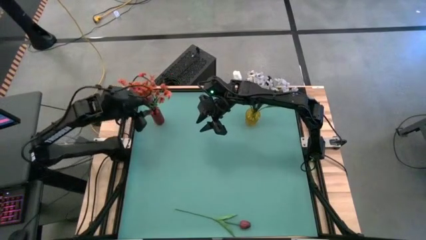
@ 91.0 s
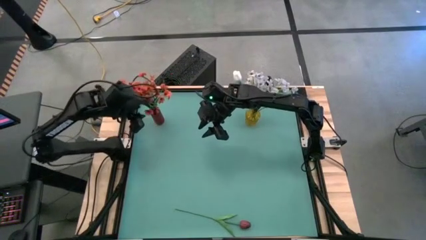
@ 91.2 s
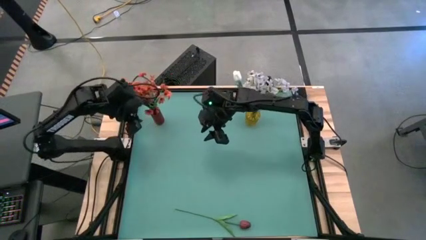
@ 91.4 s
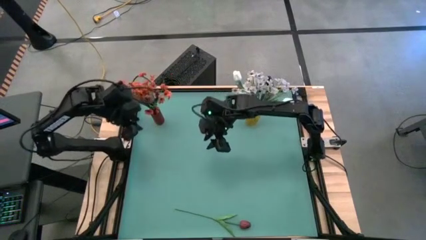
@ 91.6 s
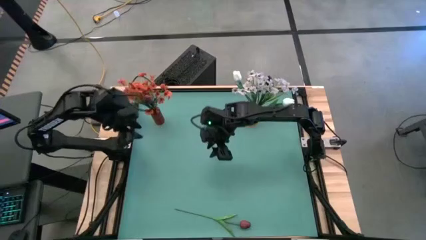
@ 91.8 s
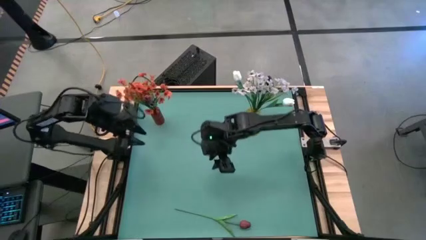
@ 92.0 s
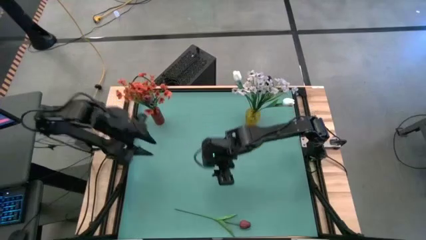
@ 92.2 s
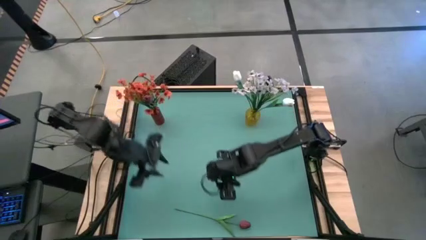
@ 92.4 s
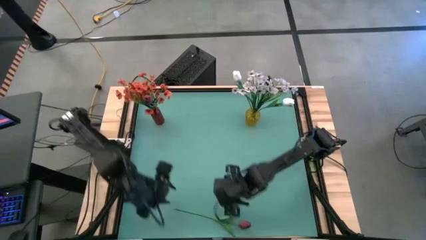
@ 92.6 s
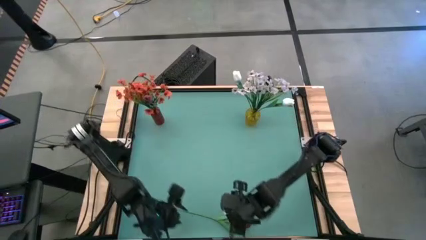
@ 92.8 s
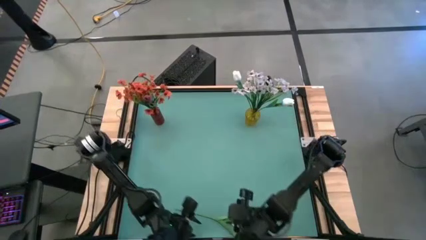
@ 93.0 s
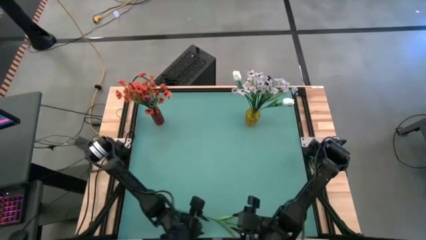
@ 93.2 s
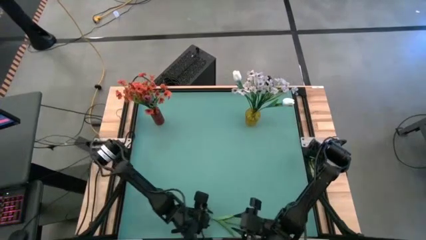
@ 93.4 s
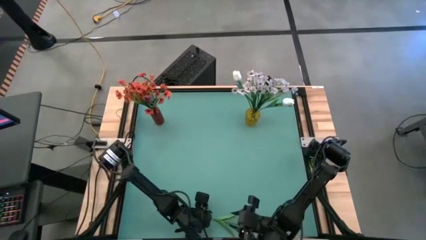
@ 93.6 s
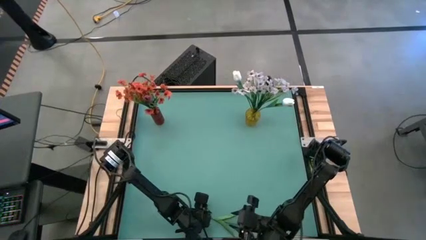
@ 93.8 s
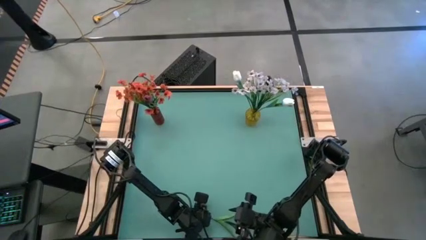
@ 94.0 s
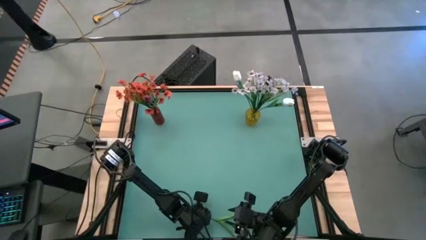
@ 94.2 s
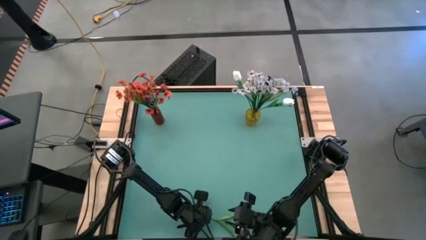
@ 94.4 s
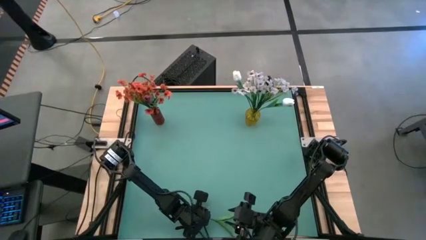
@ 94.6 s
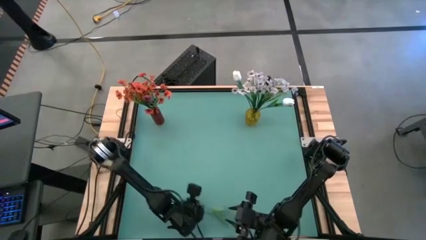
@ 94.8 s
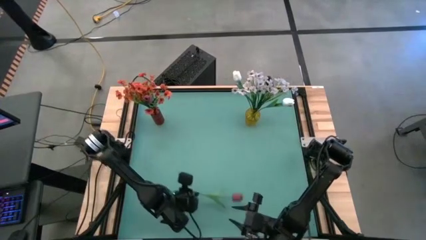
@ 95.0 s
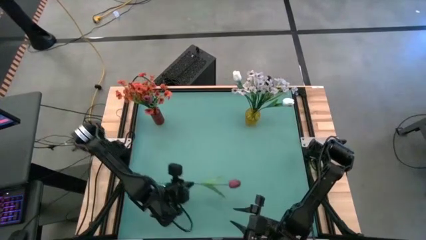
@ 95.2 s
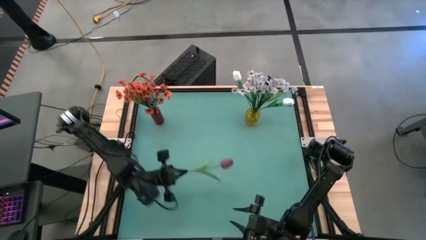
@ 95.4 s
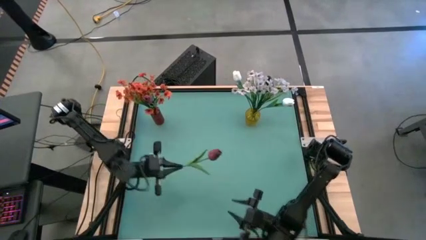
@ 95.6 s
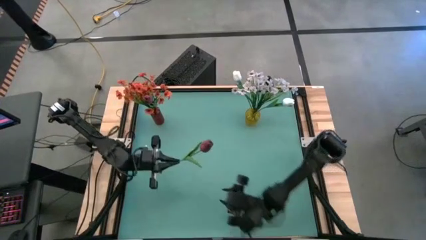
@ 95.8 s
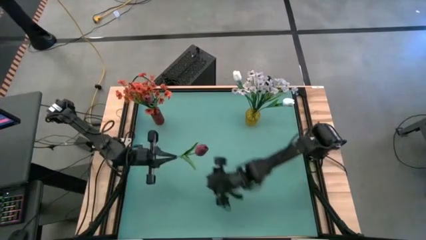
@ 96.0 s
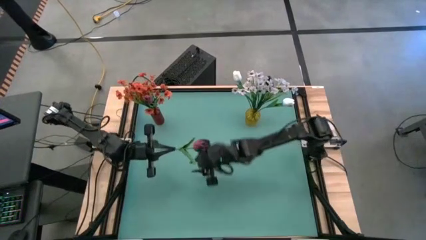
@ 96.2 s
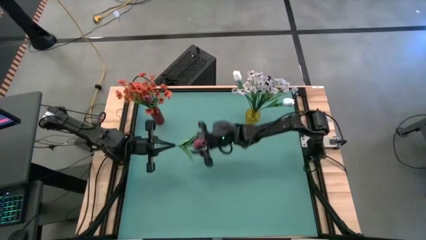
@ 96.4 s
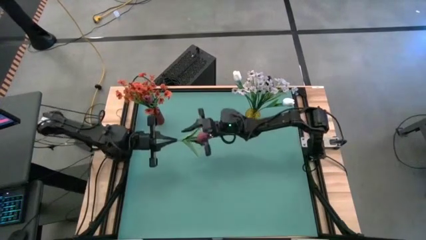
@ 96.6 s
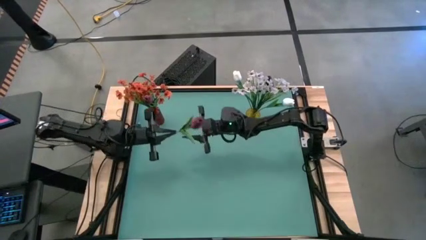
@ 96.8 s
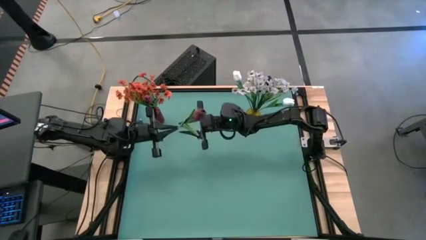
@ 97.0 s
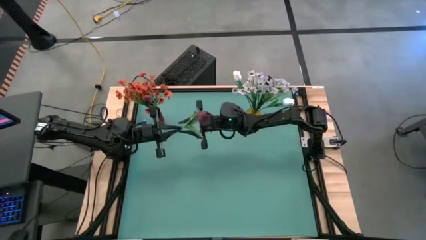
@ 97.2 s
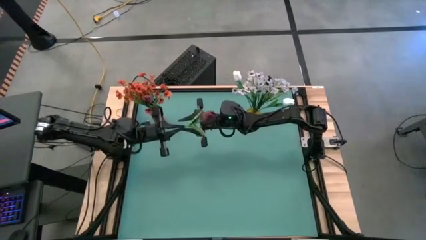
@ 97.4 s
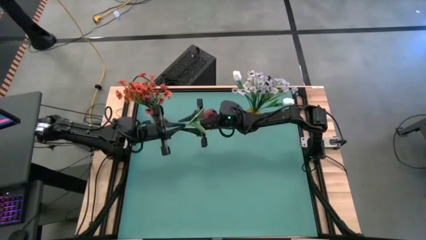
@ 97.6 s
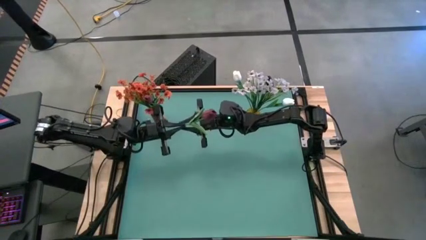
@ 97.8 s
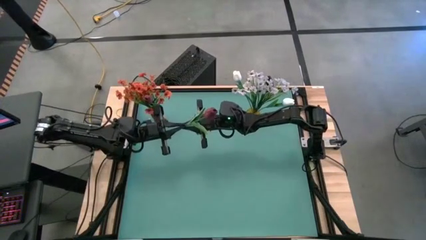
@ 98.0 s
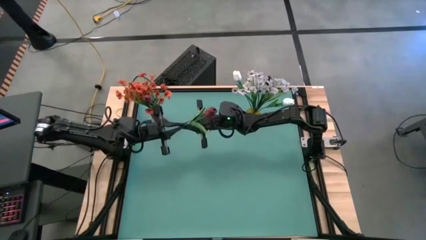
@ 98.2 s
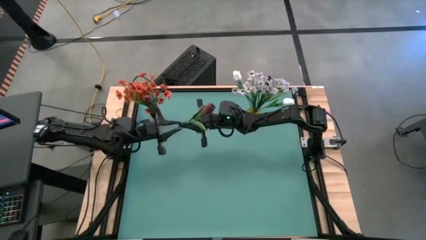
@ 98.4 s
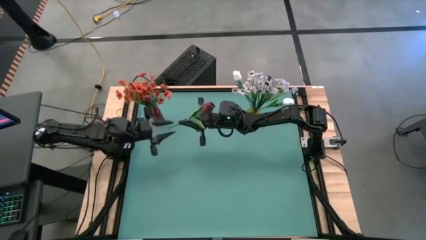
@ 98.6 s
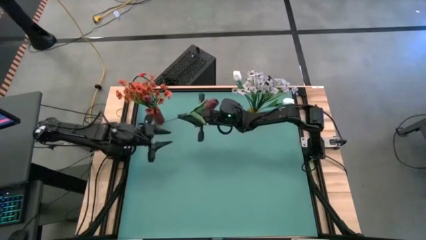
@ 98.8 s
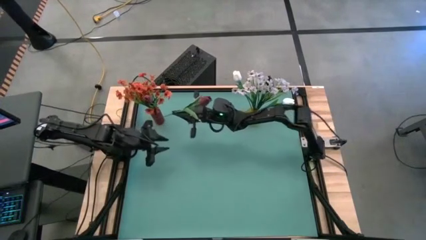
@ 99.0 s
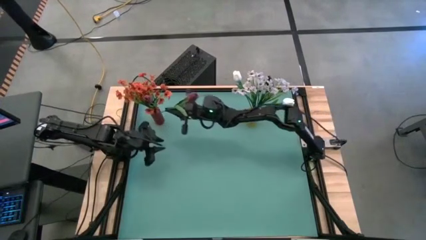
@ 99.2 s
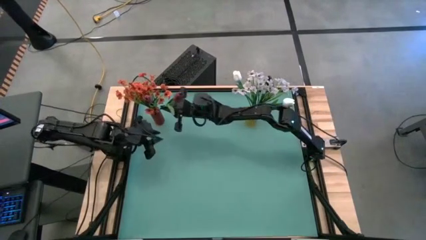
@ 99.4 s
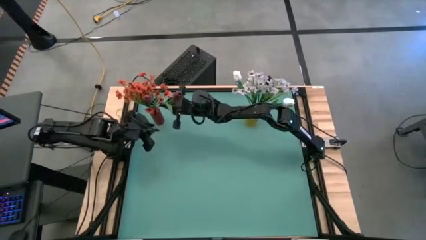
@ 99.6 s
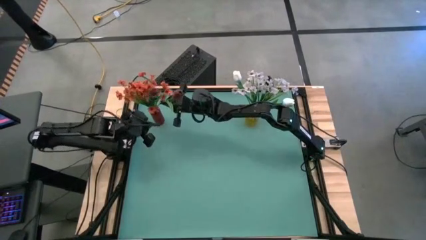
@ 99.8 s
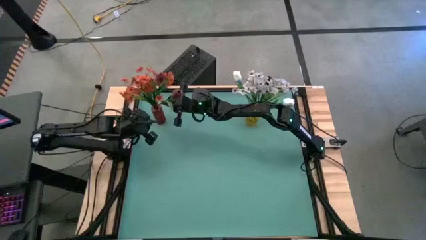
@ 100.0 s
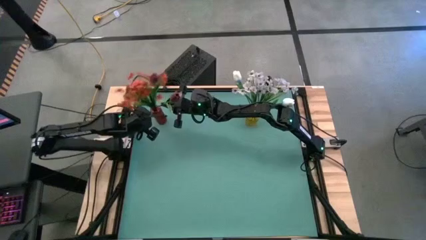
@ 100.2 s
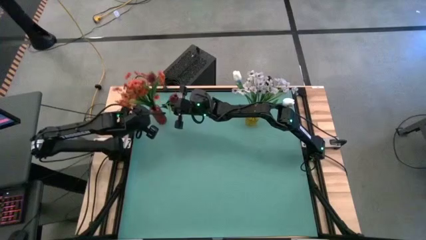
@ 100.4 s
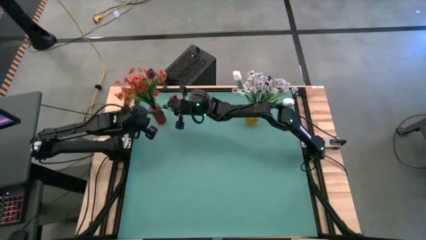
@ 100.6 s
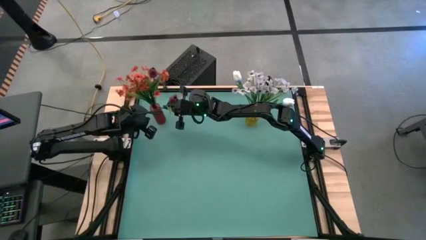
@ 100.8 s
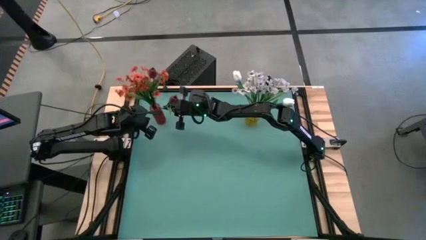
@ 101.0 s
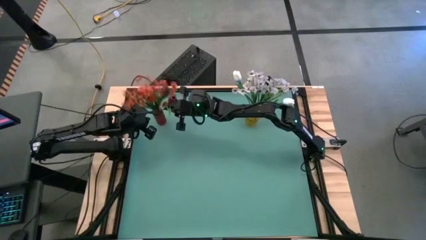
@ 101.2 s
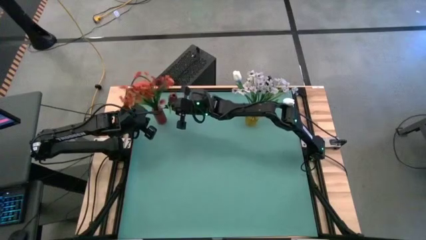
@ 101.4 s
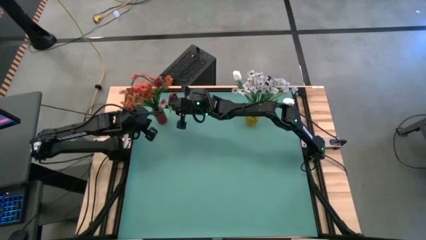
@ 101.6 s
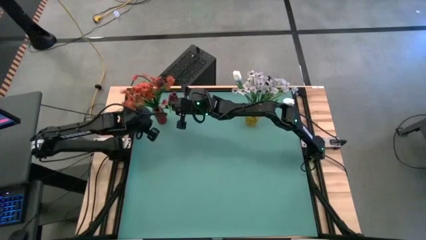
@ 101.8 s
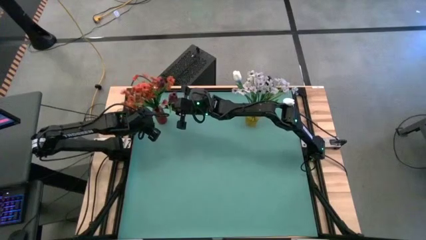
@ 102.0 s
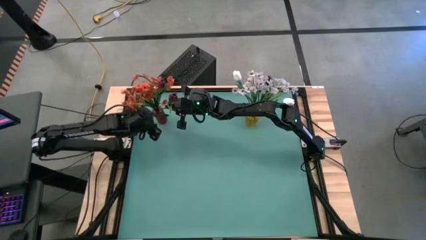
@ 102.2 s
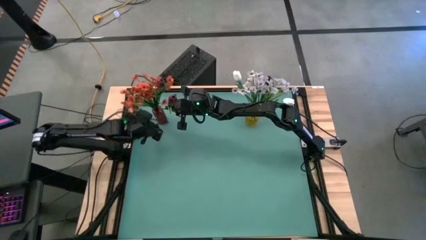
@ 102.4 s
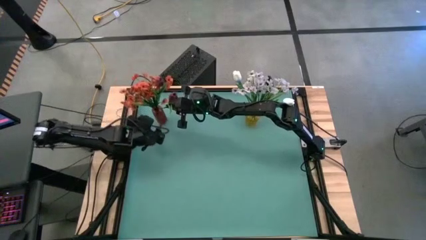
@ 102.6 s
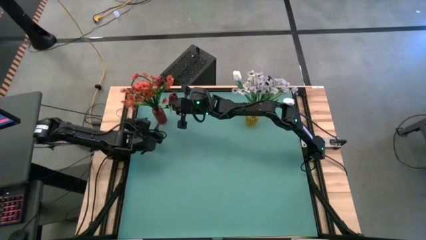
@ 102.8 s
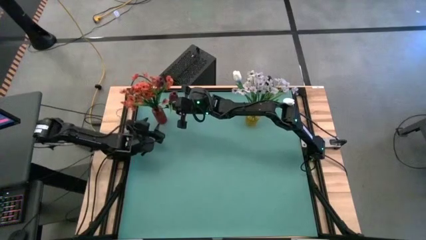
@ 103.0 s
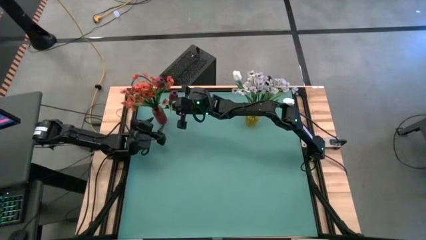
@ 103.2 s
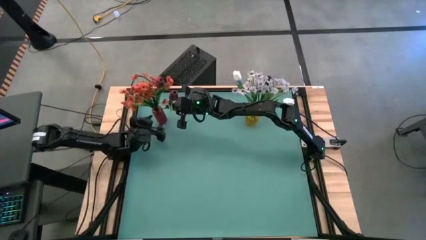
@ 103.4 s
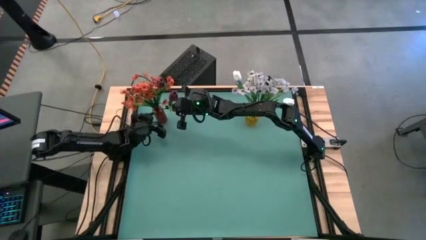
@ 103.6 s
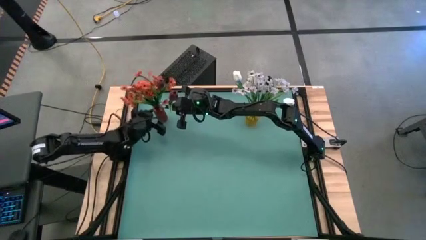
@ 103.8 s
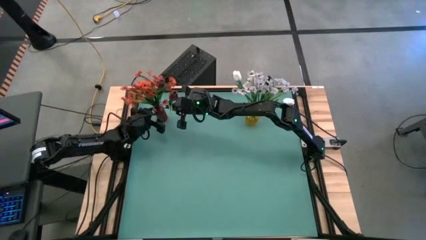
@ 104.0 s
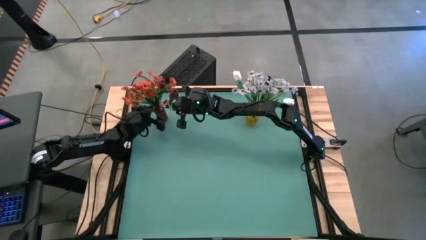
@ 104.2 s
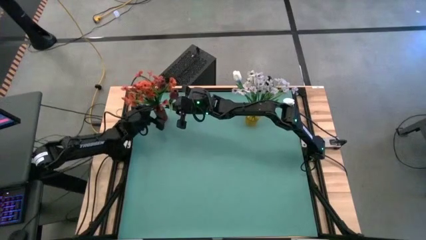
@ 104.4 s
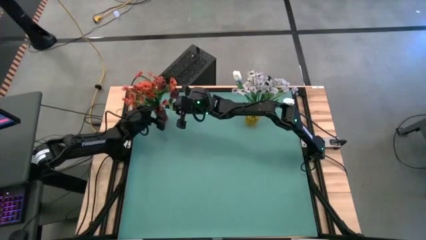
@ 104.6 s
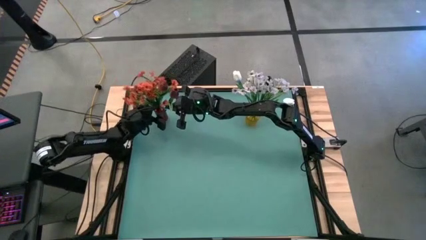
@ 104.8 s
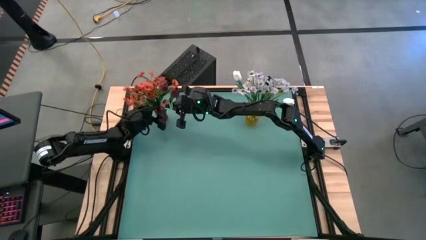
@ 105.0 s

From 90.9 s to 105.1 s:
Task: Sort flowers into vase by color
Put the dark red flower into the red flower vase

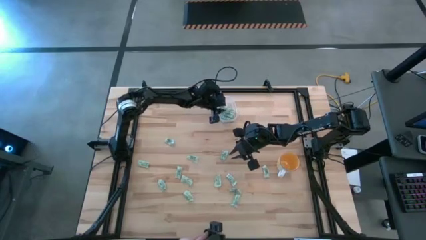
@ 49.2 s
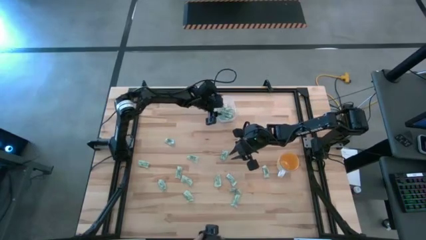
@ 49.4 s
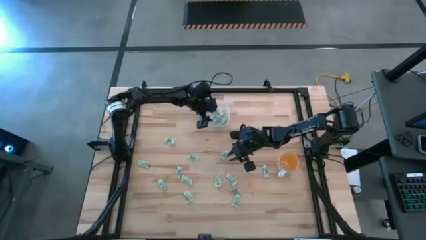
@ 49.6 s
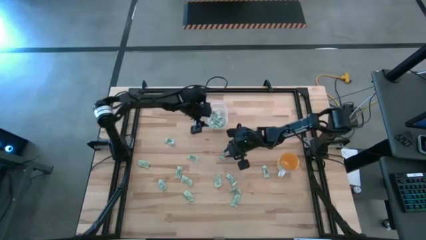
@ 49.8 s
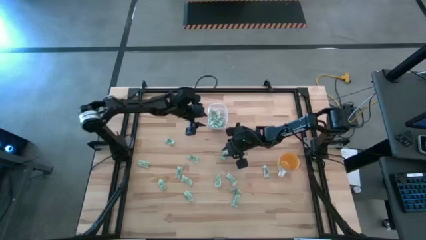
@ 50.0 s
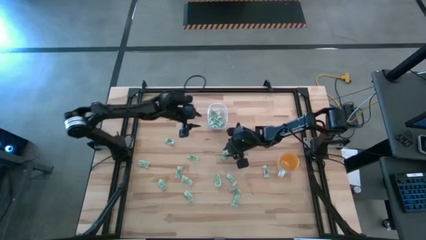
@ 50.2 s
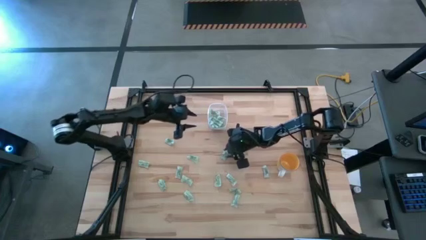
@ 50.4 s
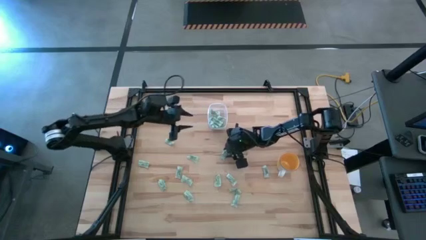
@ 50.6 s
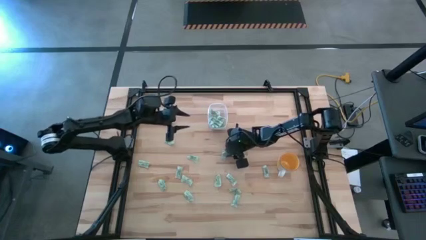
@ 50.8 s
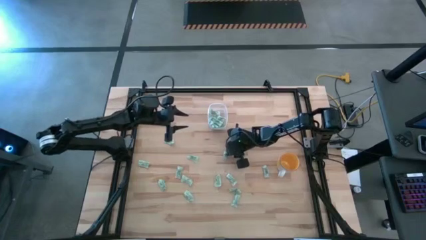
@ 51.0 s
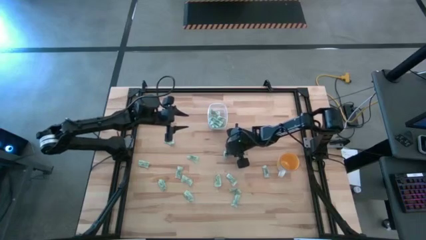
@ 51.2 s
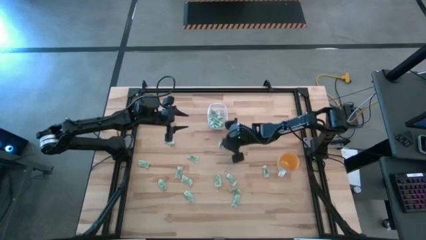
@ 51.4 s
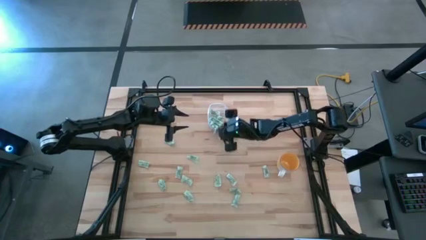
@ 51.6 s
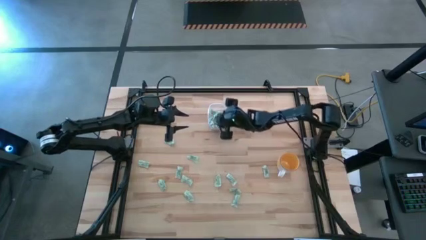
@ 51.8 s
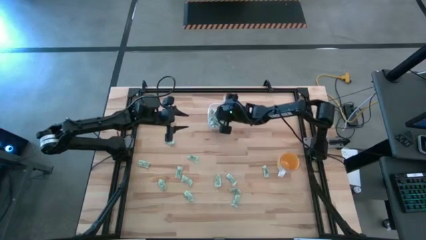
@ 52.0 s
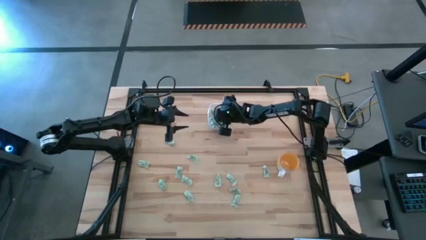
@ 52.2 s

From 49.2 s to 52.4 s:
Task: Pick and place Stevia / Truvia into bins
Put the green stevia packet into the transparent bin
